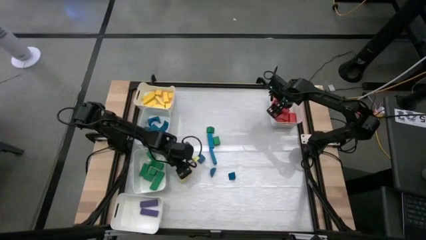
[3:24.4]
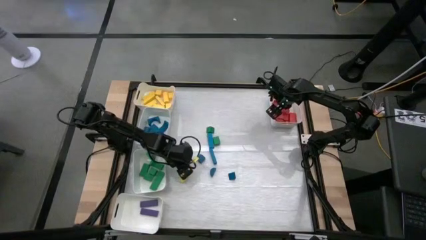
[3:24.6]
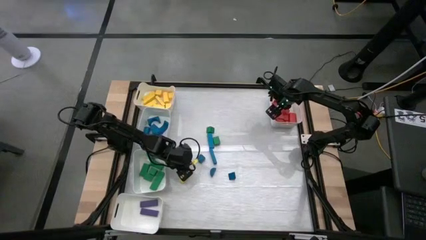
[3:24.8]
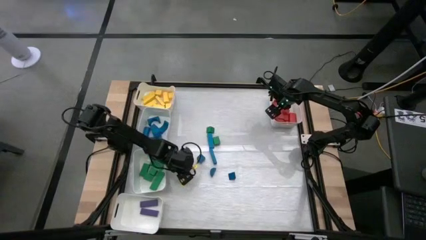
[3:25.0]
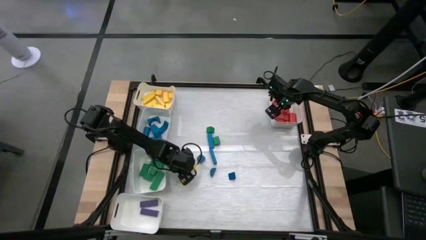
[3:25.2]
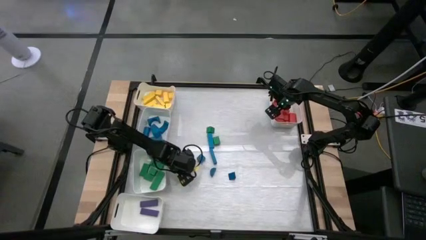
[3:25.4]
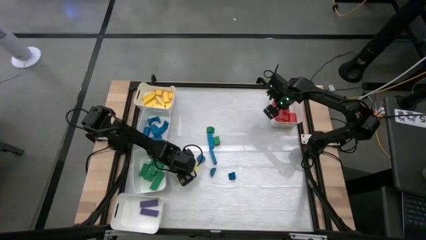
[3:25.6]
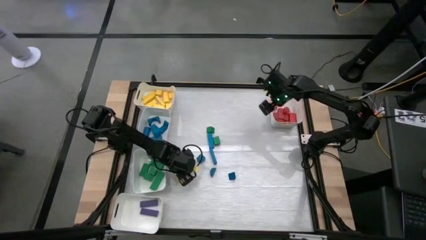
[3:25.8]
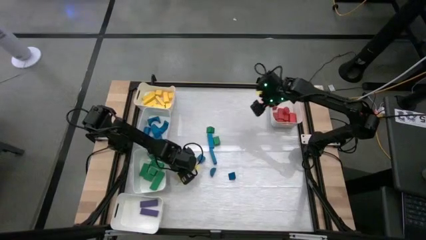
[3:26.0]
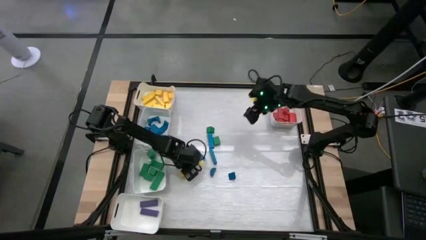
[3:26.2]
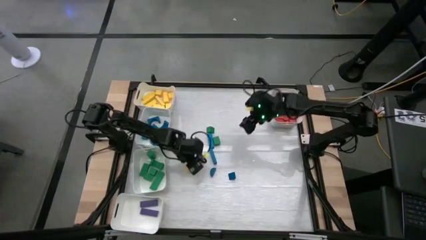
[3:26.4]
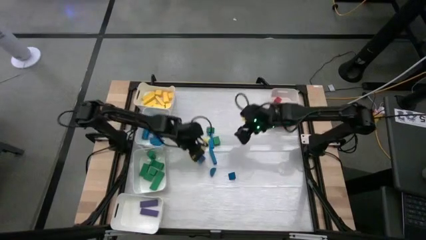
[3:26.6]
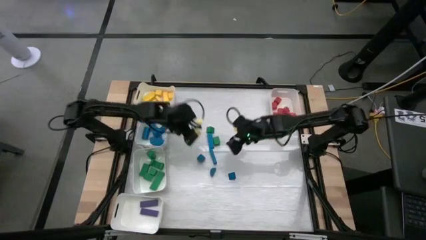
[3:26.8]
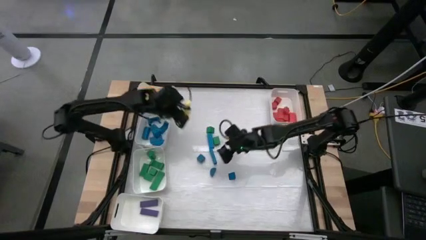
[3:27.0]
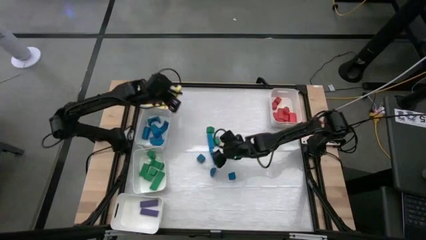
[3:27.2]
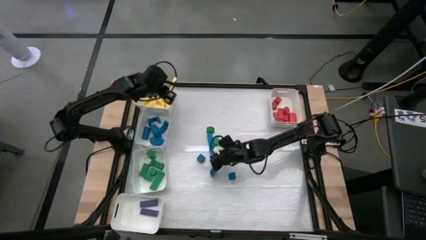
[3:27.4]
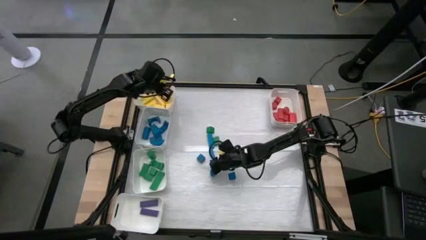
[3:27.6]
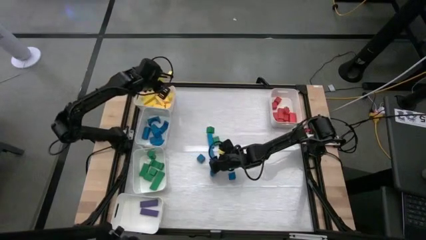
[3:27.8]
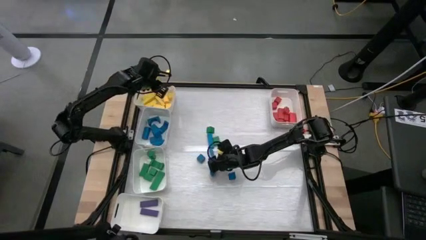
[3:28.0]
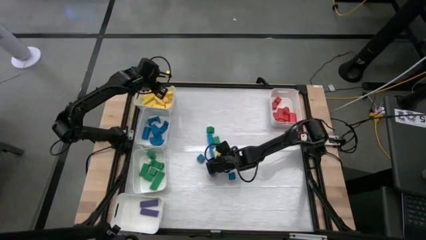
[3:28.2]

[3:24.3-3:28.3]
Task: Sort blocks
Put the yellow wooden block into the top left white bin

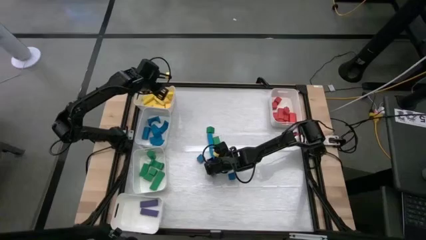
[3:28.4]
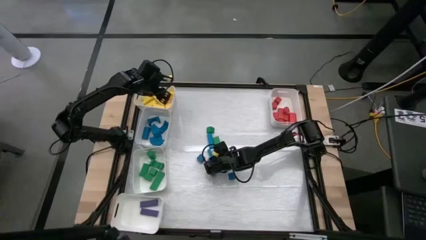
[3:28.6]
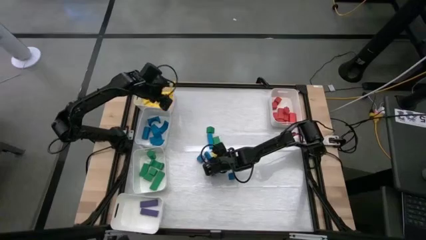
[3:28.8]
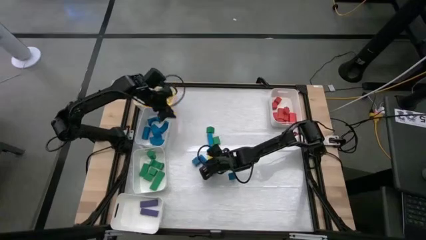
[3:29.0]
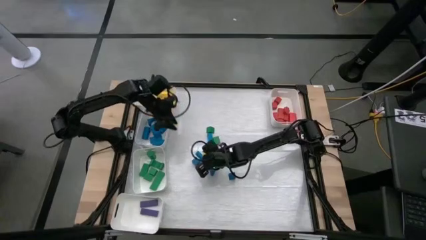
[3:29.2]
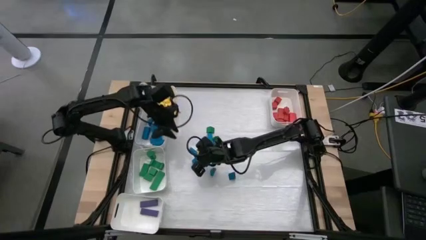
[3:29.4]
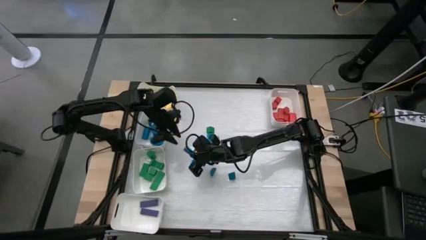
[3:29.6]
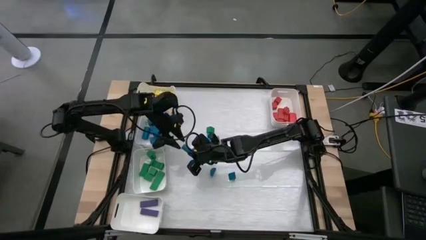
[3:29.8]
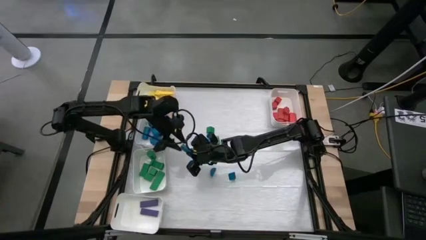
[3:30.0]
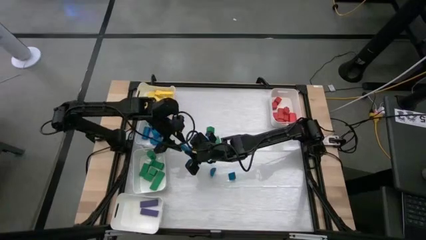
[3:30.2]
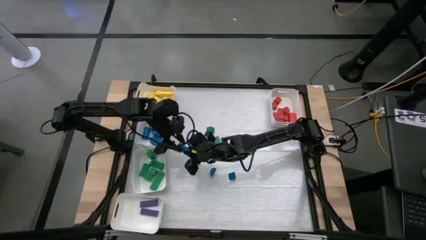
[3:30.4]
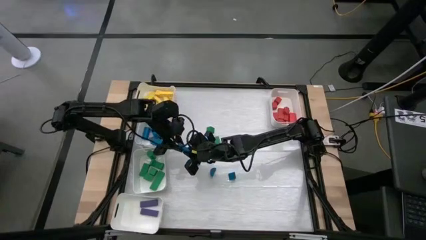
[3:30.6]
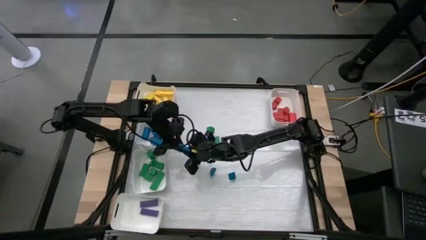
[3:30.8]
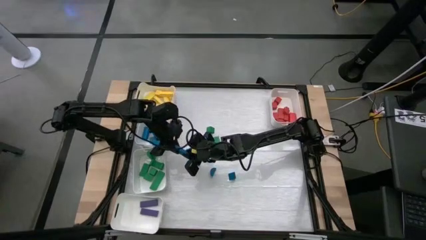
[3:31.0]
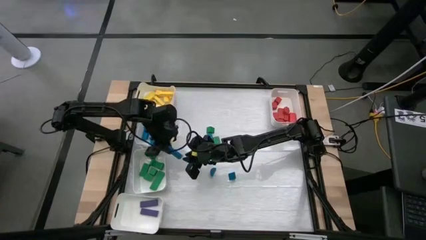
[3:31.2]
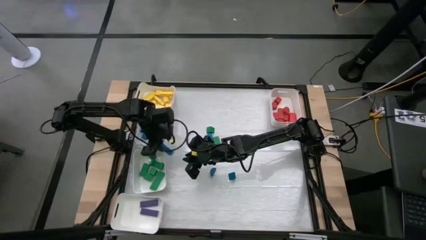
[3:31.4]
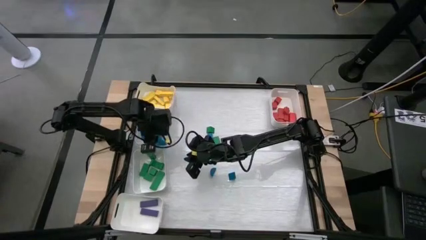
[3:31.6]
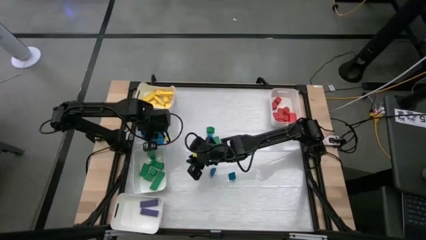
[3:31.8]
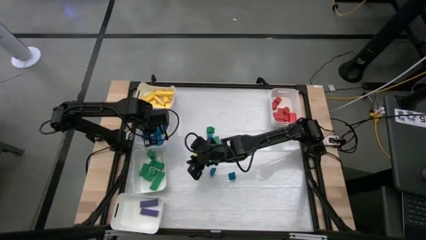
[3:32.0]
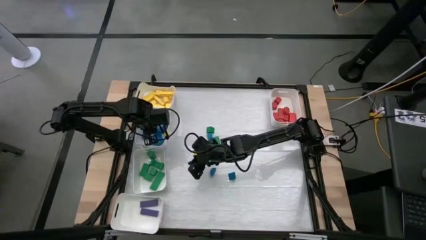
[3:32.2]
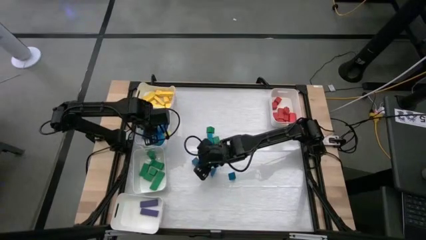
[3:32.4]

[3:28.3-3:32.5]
Put the blue wooden block into the top middle left white bin

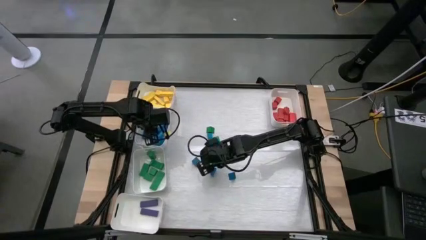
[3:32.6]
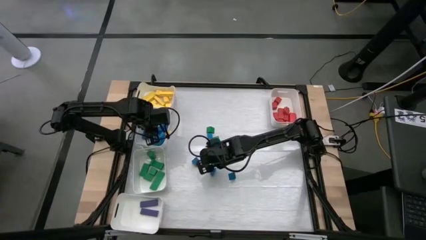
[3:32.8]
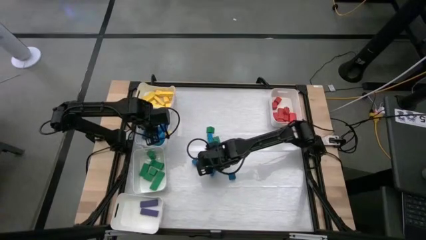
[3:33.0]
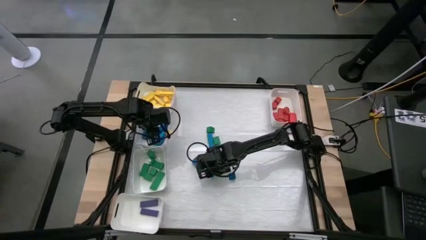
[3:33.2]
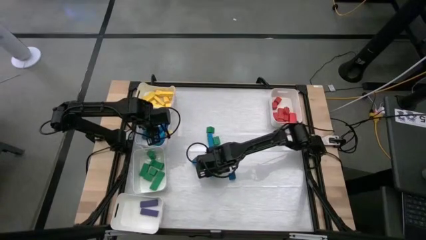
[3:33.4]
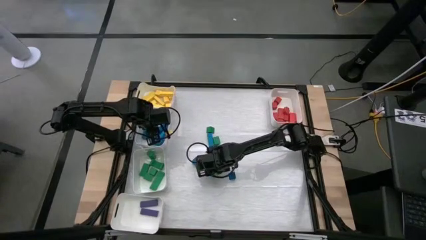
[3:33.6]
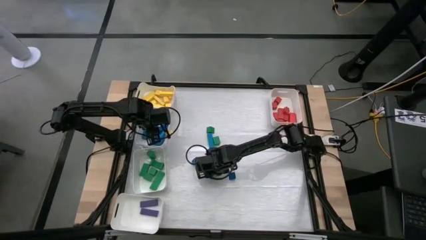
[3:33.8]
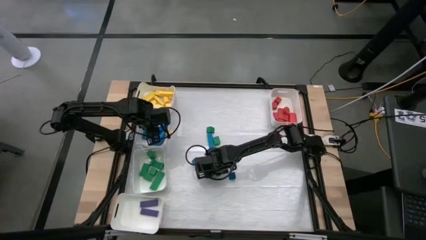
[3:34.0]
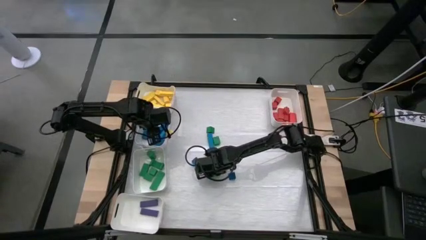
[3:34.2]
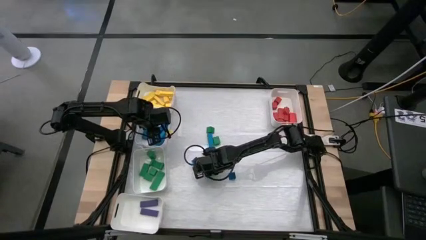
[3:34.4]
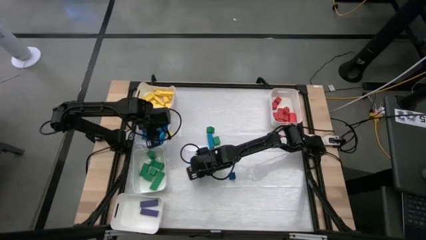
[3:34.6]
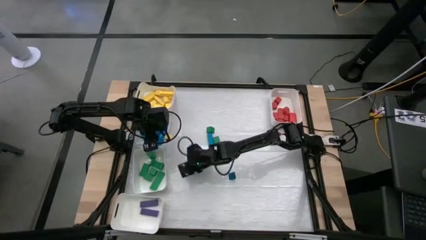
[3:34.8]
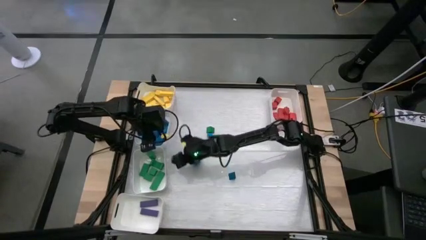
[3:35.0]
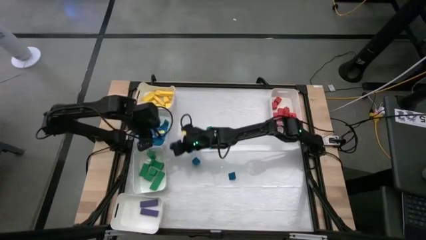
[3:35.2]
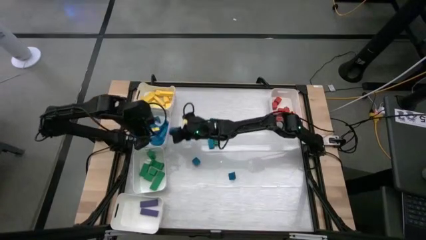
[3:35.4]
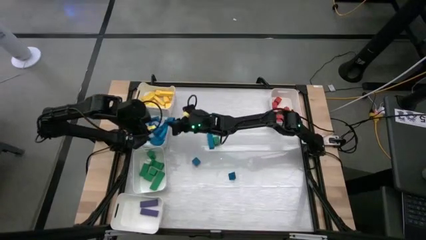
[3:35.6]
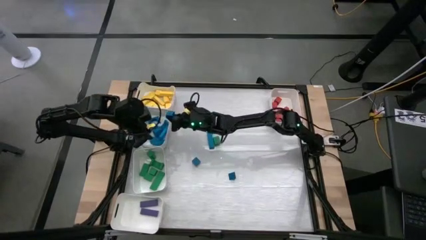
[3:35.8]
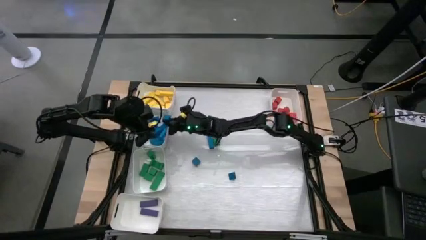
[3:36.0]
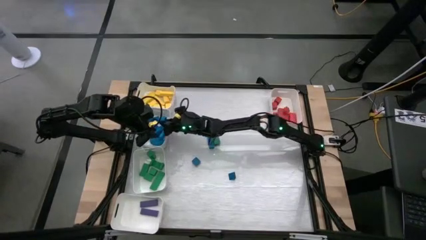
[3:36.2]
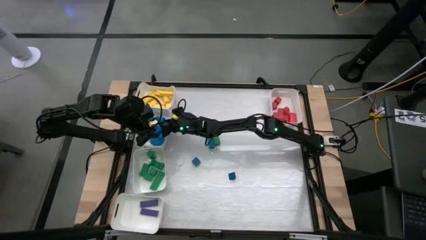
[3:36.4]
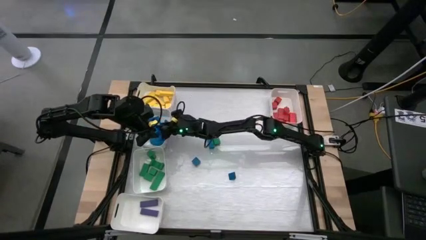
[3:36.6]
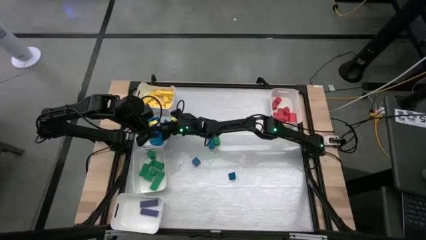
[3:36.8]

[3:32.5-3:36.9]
Put the blue wooden block into the top middle left white bin

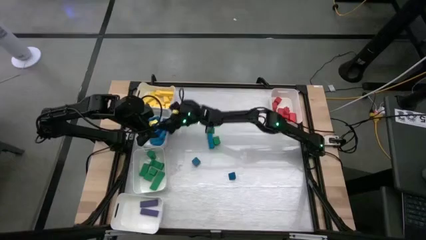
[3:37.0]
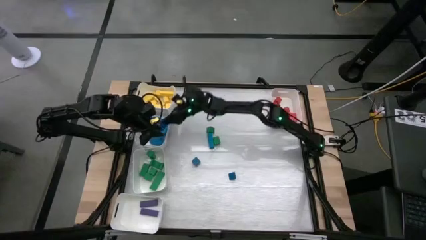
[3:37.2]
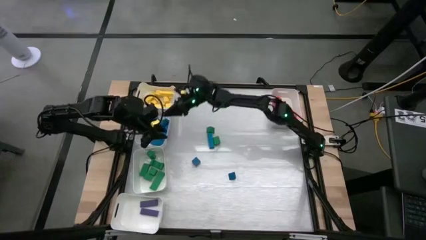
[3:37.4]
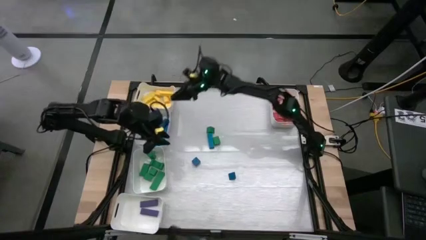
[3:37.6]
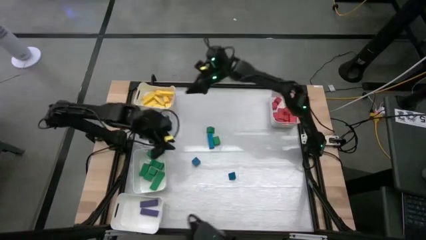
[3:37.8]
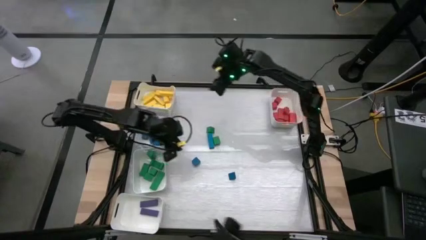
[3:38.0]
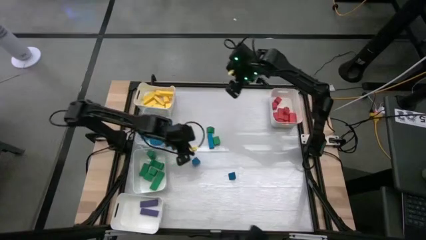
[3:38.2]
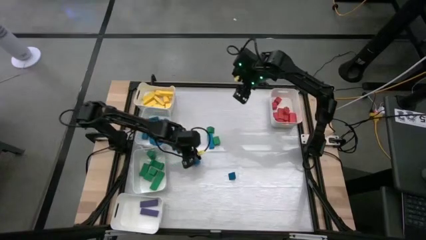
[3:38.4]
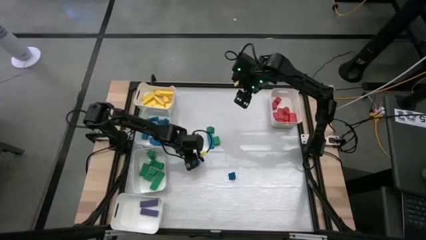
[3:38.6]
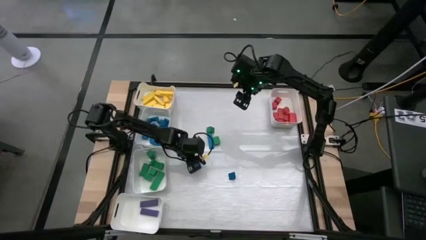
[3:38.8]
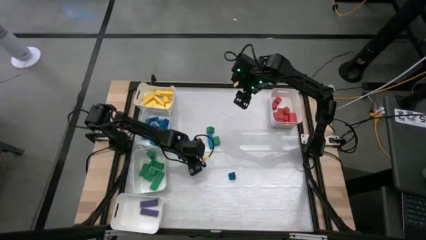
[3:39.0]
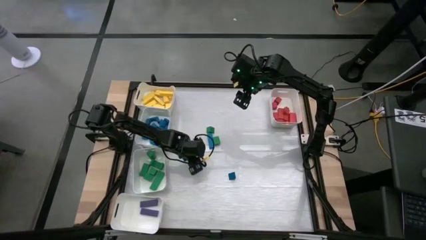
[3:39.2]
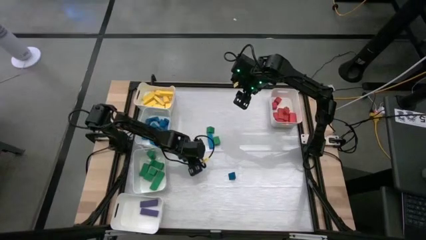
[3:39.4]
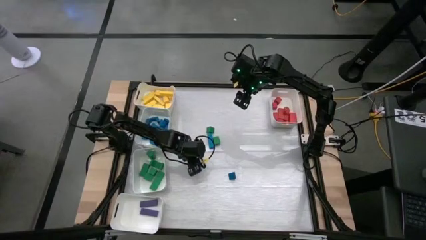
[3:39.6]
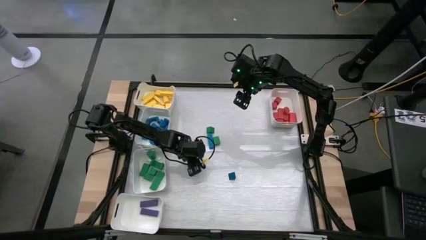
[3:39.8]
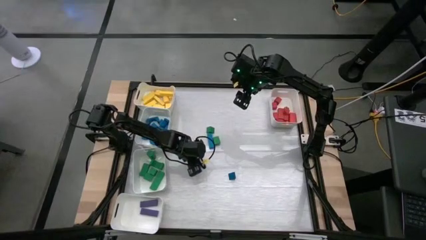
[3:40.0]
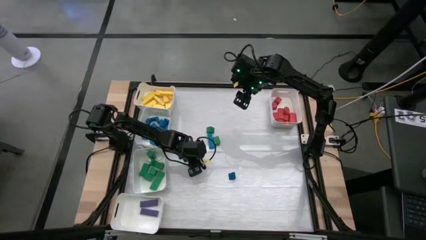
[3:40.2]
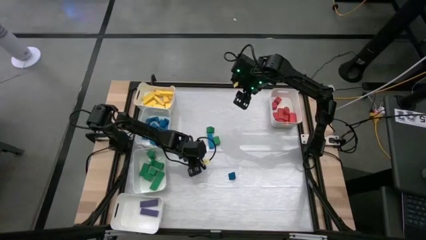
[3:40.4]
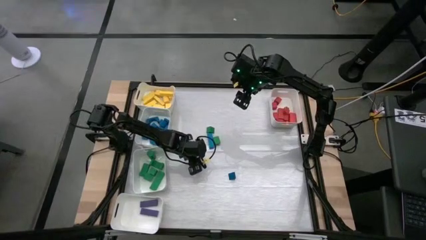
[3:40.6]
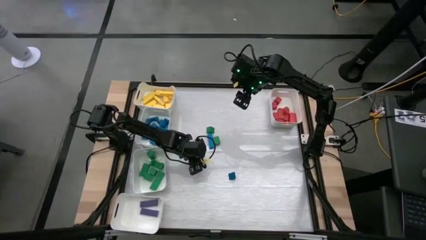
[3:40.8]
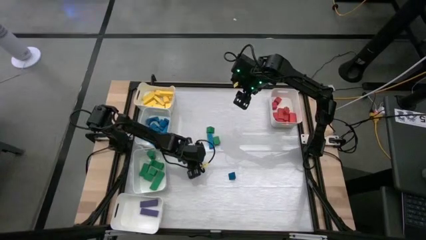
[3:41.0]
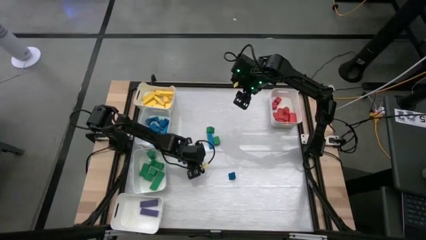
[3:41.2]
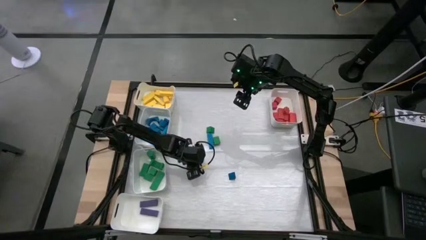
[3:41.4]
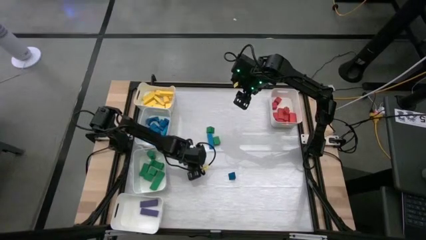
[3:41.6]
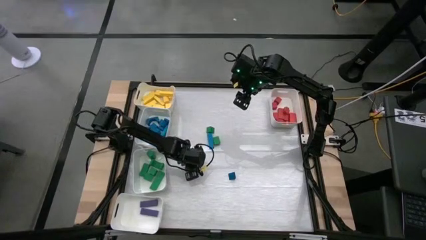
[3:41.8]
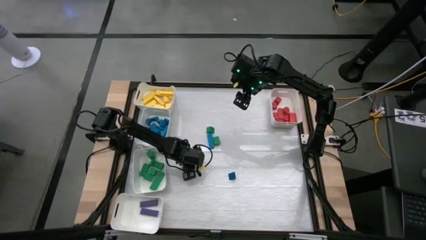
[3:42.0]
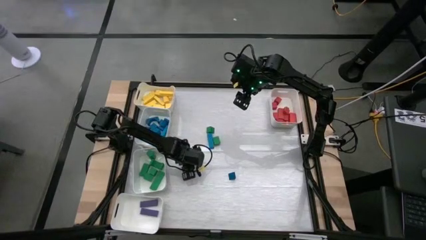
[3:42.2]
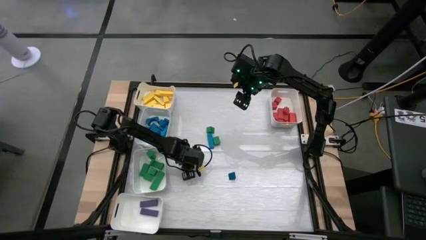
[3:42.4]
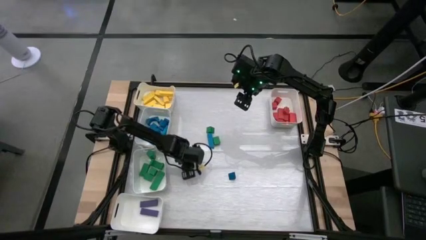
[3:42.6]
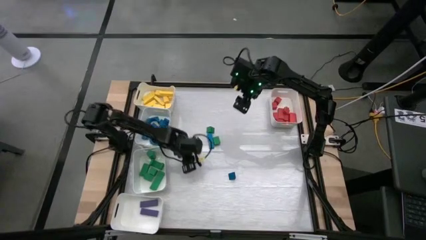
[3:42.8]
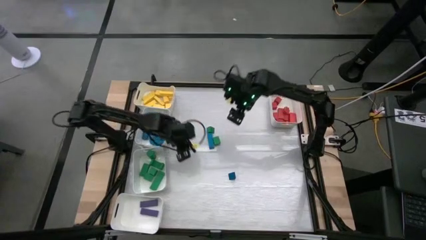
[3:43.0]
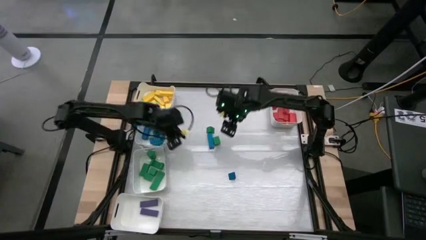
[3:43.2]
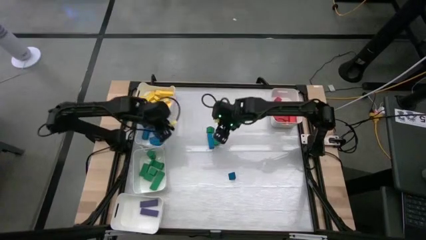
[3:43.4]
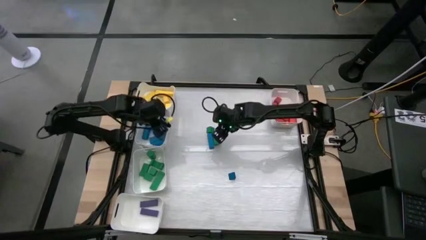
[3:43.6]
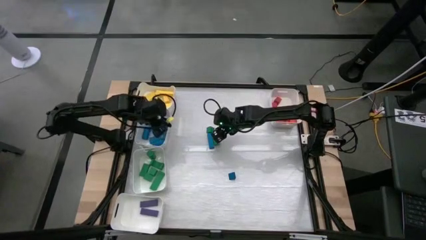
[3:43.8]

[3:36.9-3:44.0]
Put the blue wooden block into the top middle left white bin
